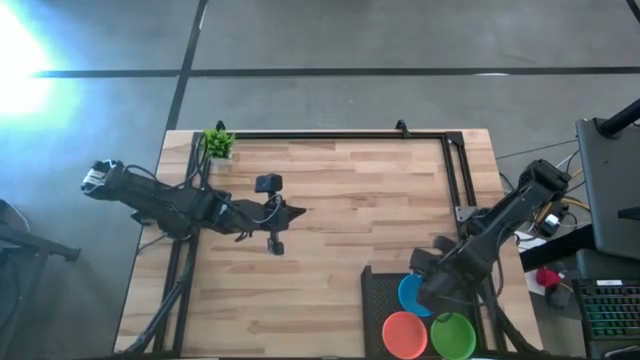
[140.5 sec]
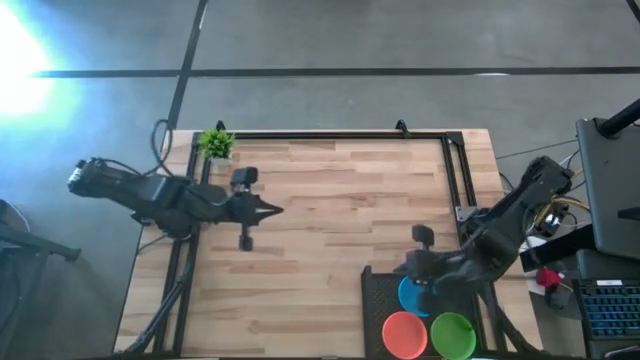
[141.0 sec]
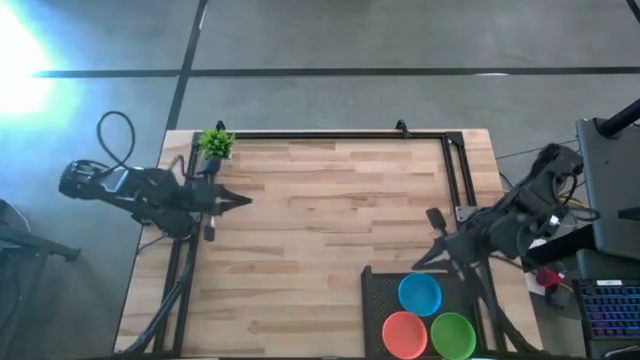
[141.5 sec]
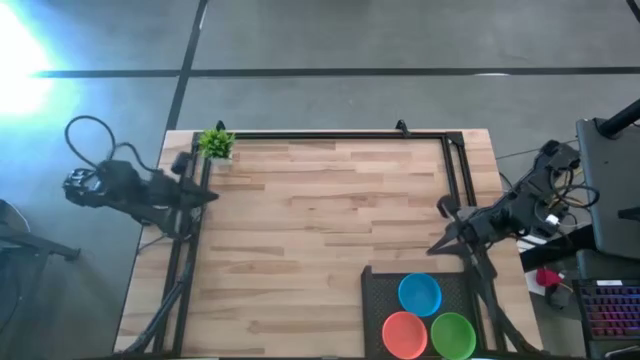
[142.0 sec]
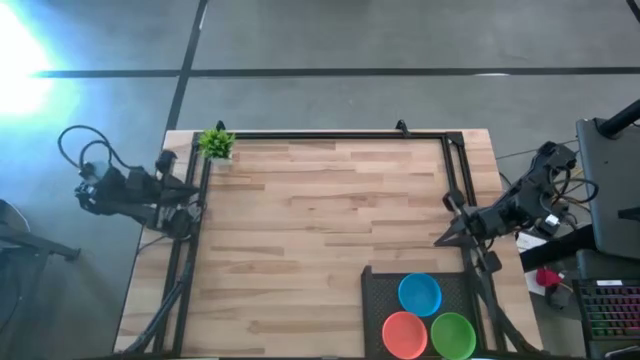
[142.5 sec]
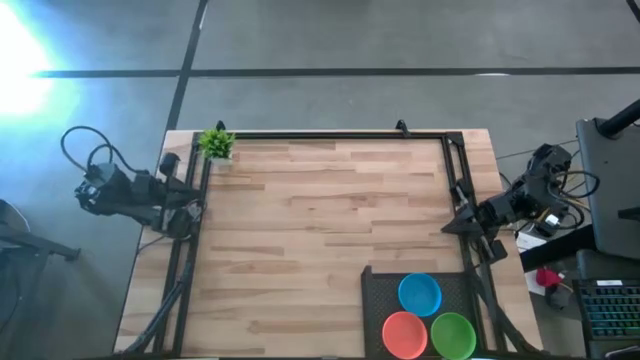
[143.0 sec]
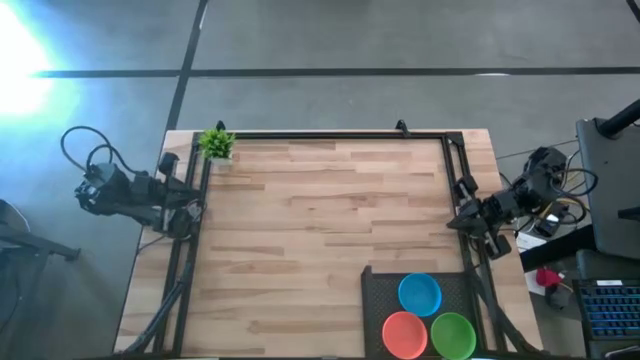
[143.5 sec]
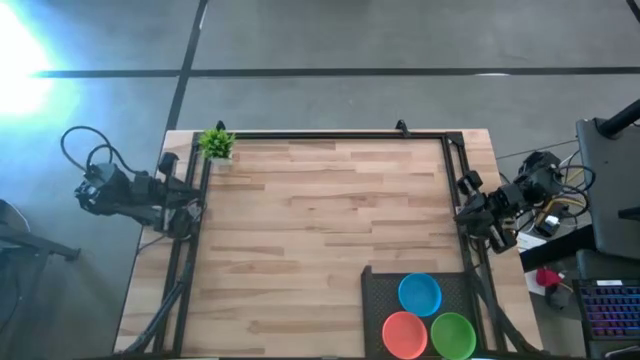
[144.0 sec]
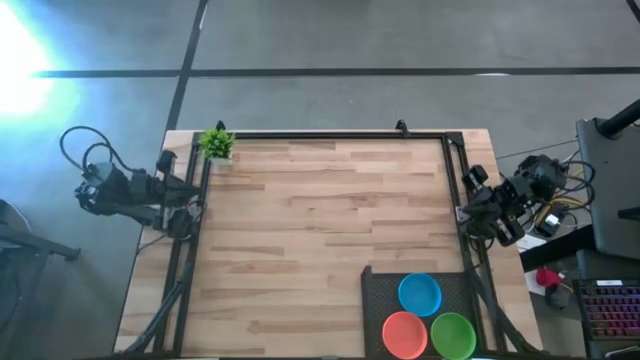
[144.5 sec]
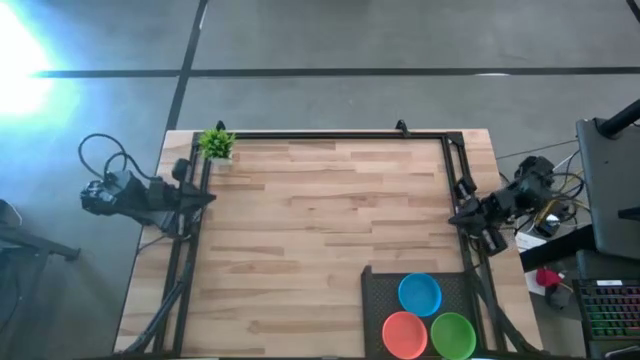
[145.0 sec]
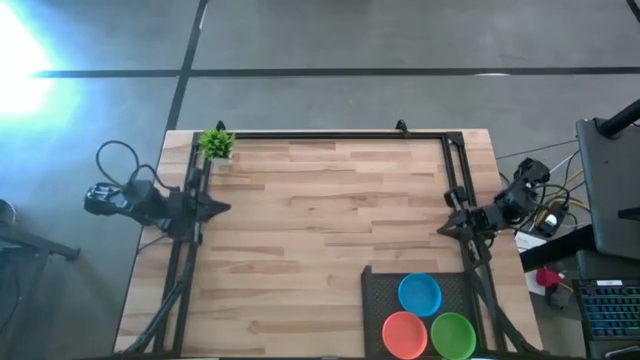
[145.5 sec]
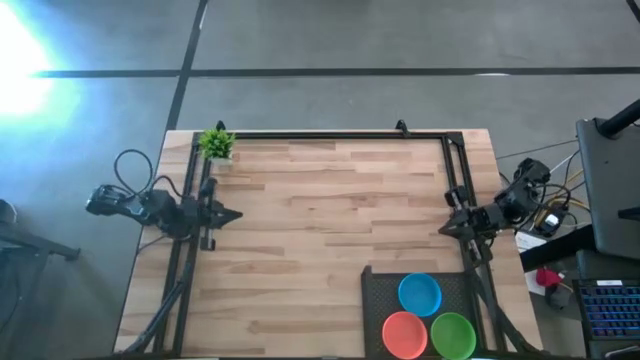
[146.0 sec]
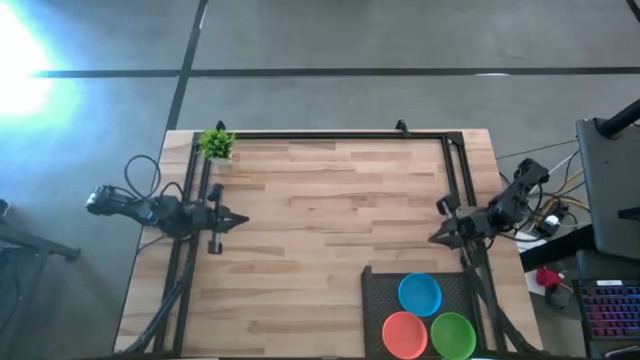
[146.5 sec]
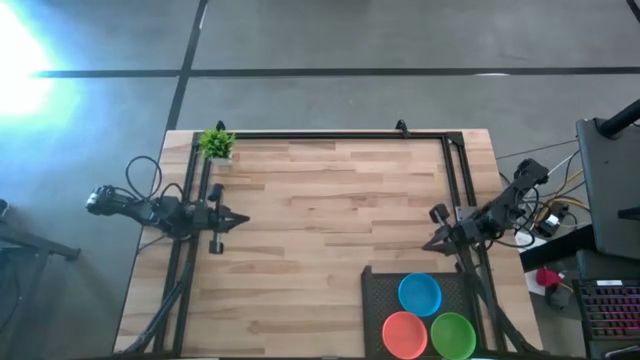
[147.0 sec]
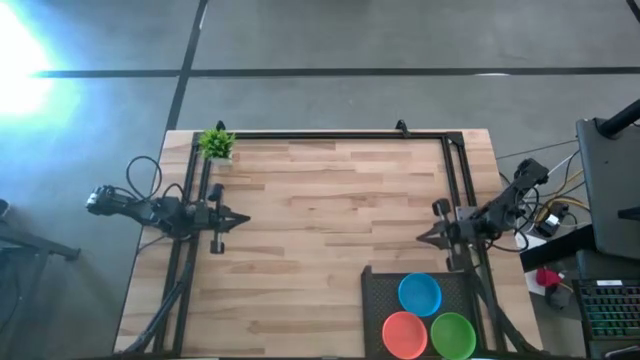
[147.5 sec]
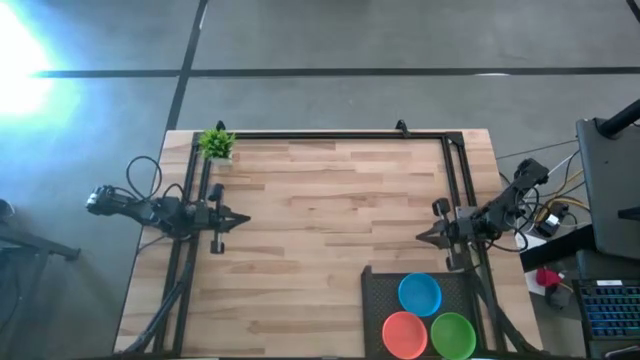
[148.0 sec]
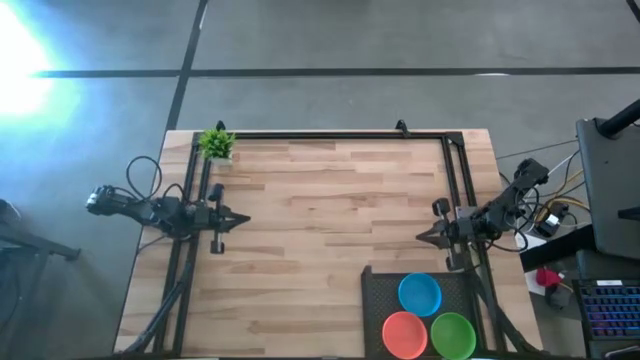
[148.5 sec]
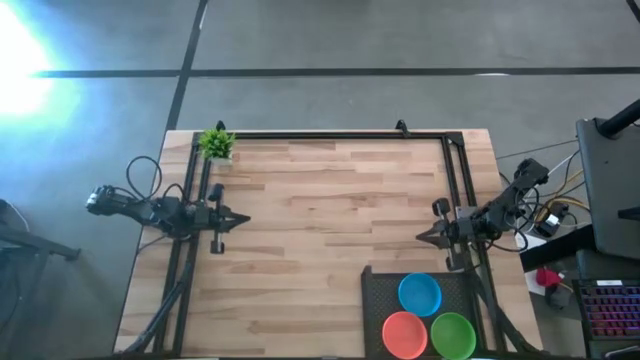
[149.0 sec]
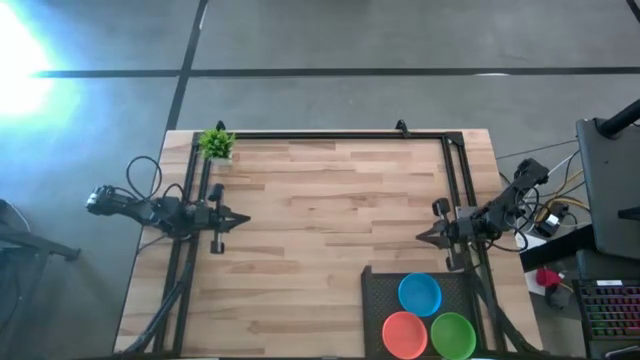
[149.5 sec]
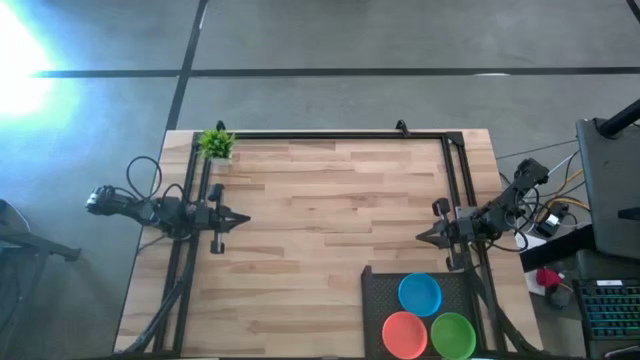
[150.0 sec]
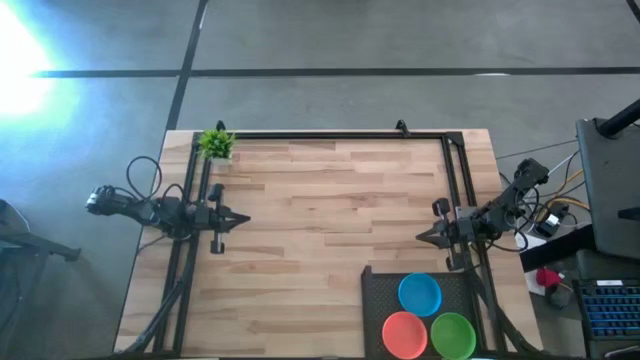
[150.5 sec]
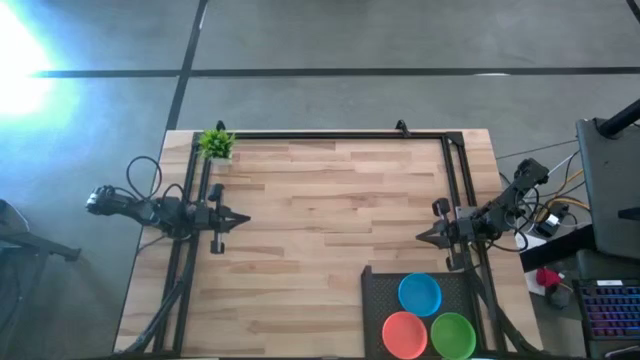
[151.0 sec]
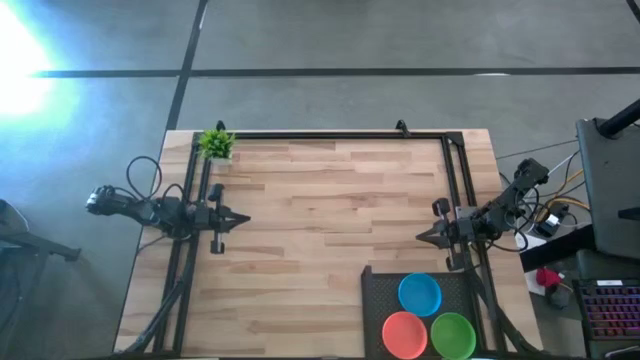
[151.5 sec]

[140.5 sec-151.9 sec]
Task: Pick & Place Mini bowls
Return to Home Position

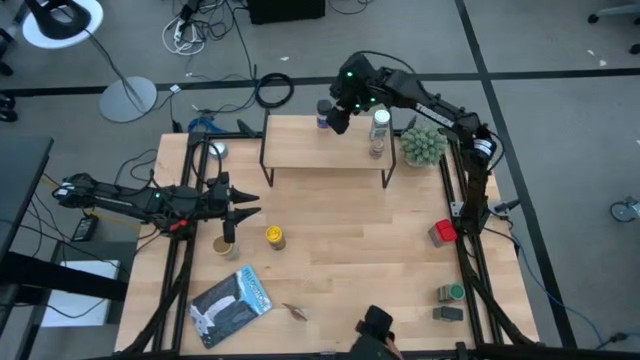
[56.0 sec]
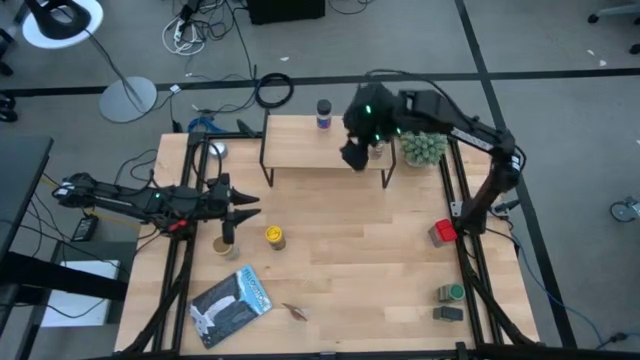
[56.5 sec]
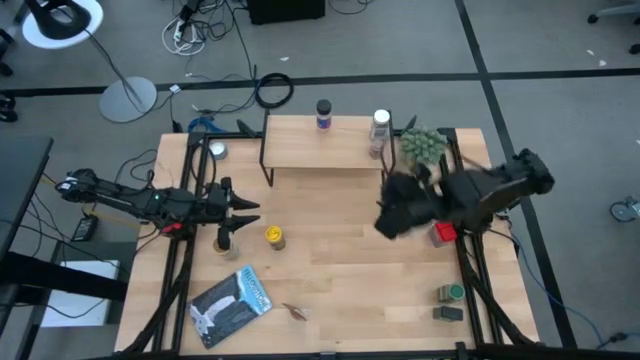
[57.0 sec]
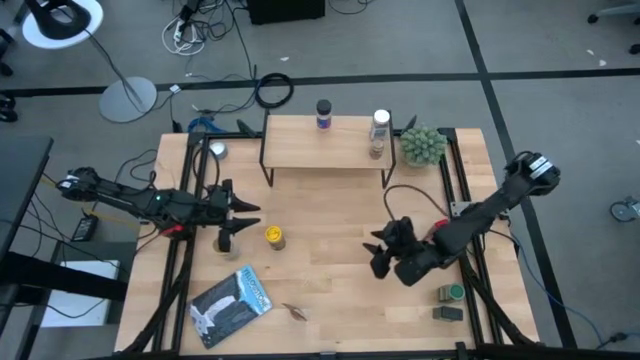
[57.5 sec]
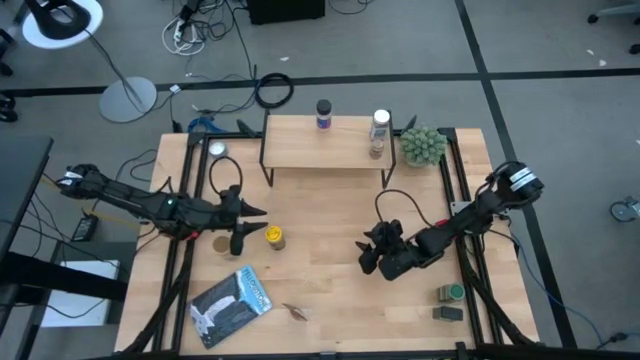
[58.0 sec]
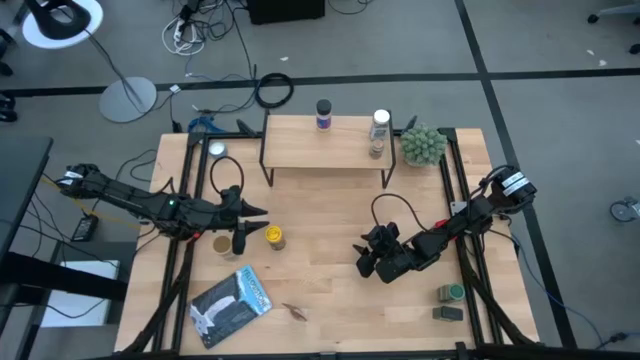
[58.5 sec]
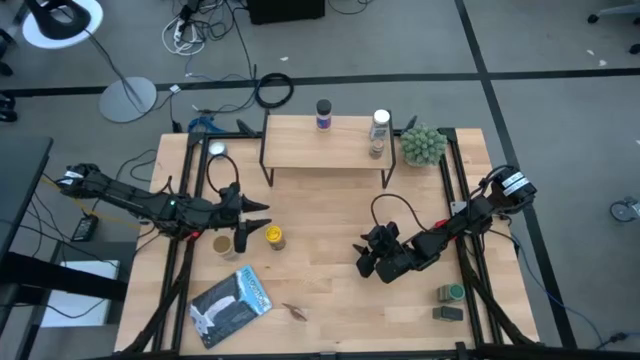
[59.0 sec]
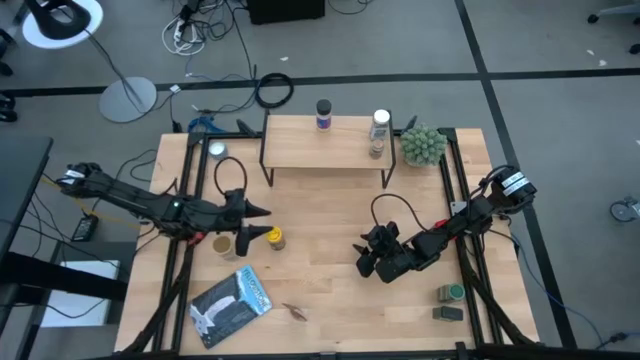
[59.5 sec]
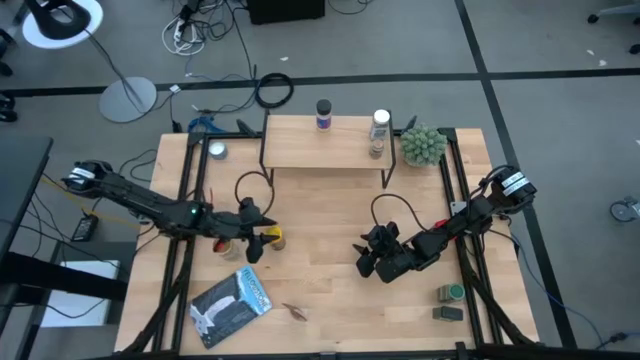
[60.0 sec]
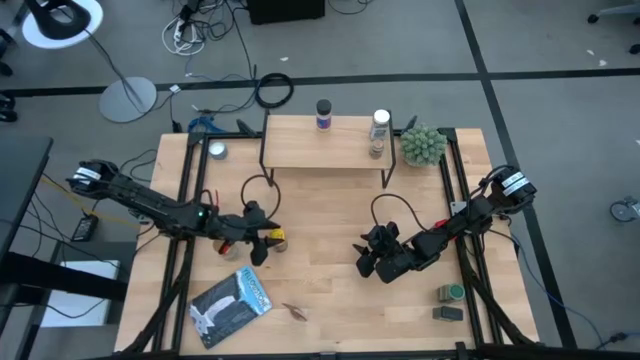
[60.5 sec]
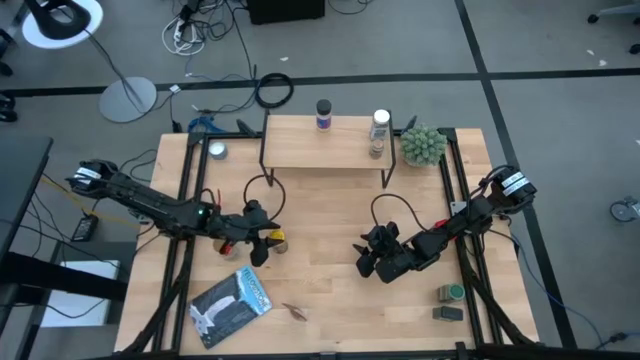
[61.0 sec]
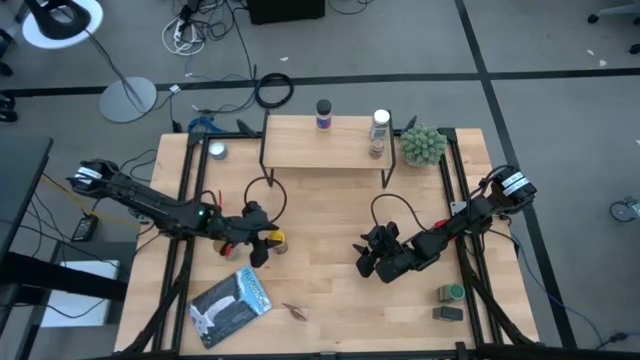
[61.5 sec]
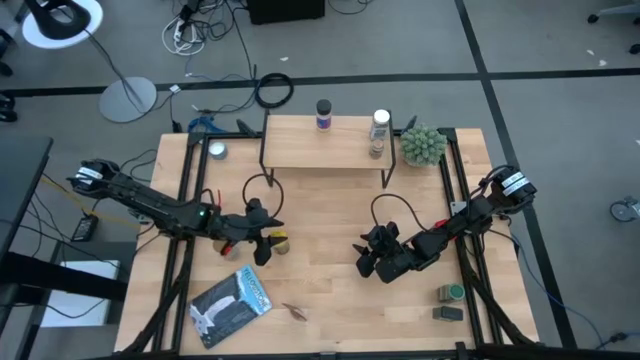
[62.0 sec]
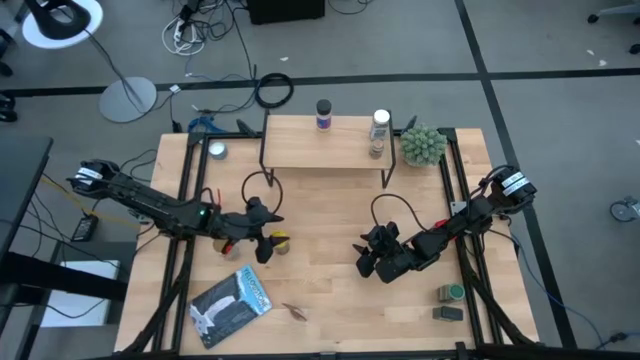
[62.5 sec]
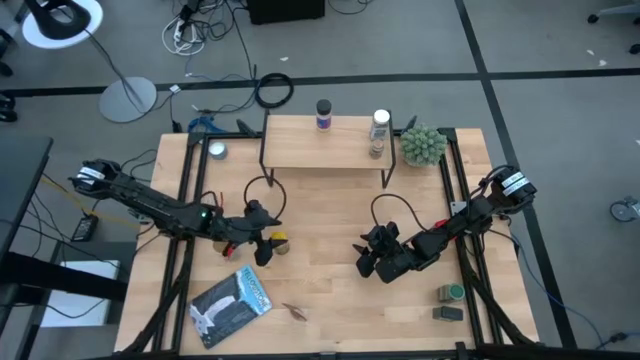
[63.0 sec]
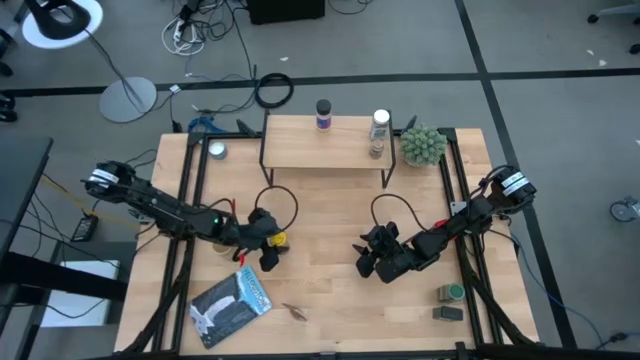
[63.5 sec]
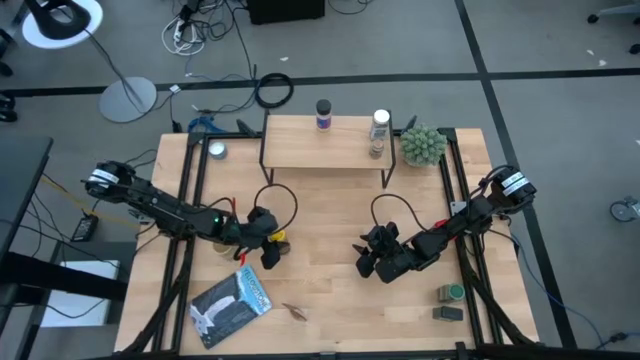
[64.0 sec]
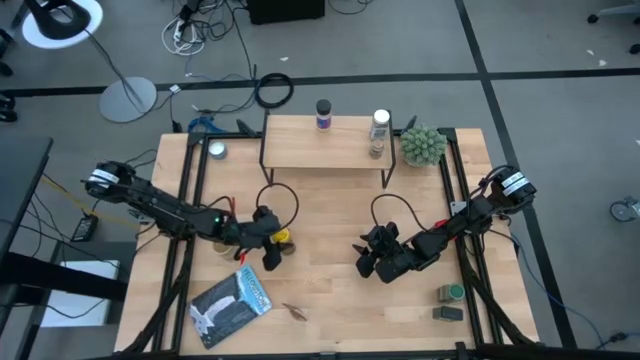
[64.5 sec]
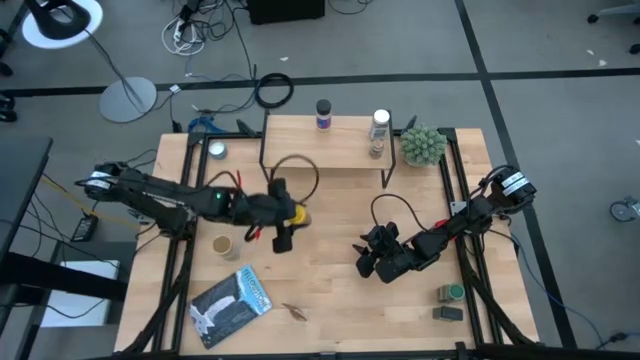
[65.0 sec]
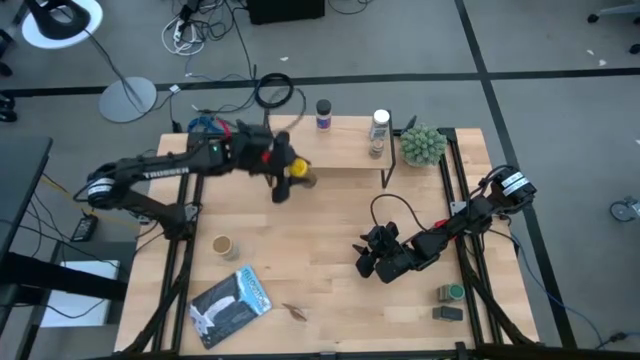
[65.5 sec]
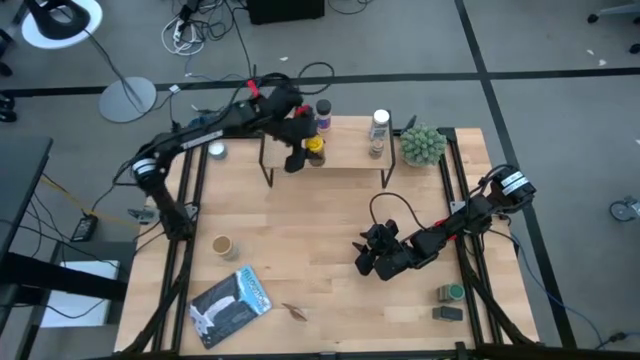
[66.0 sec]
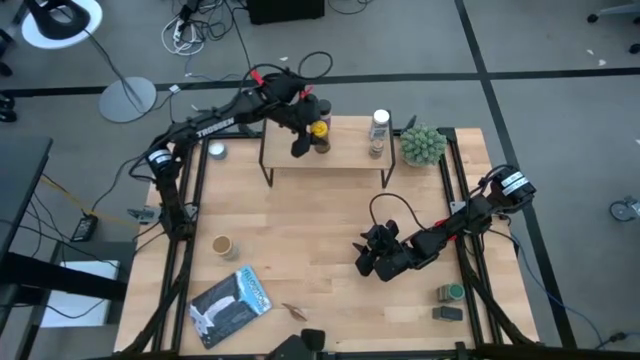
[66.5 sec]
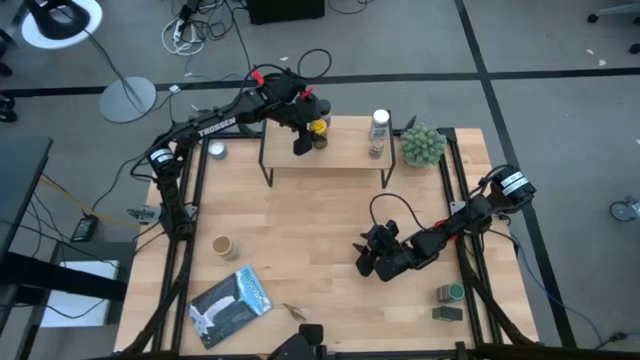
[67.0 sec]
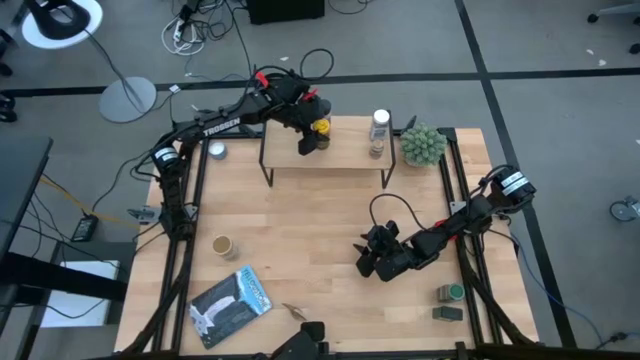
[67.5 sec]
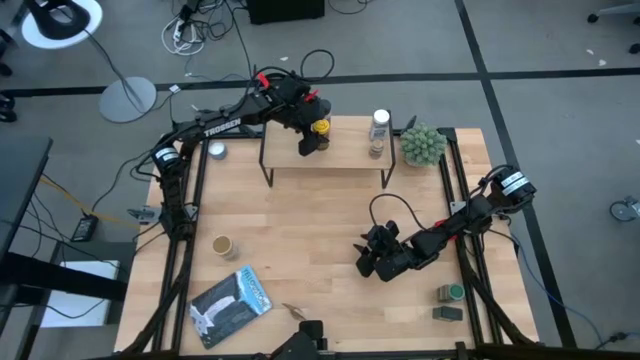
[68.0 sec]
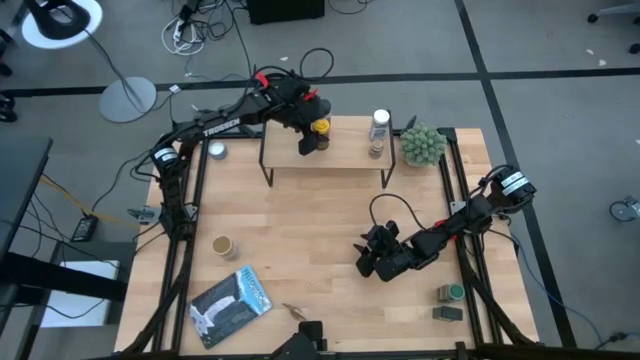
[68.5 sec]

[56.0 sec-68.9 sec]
Task: Shelf spices
Put the yellow seasoning bottle on the shelf aligned with the other black seasoning bottle
